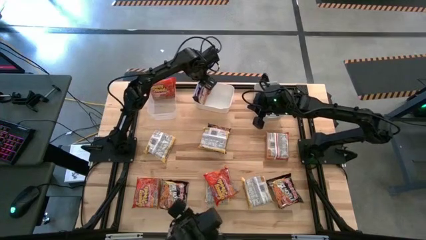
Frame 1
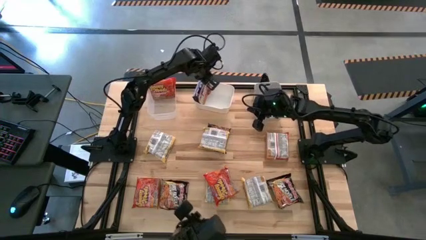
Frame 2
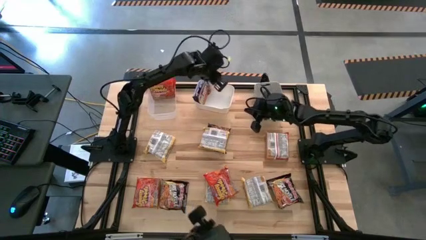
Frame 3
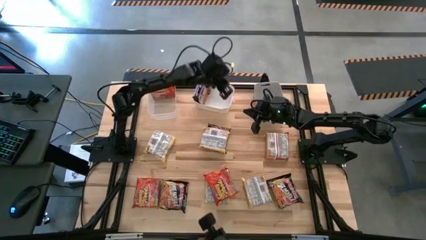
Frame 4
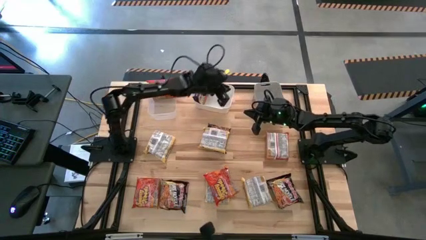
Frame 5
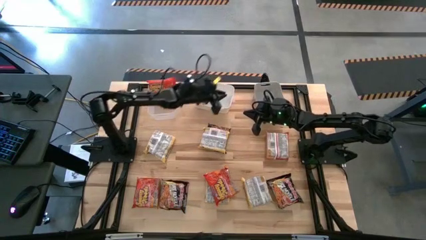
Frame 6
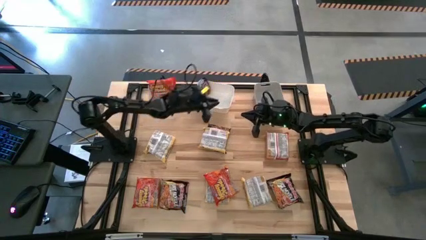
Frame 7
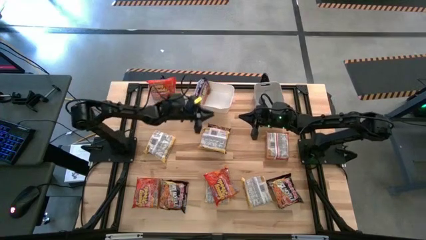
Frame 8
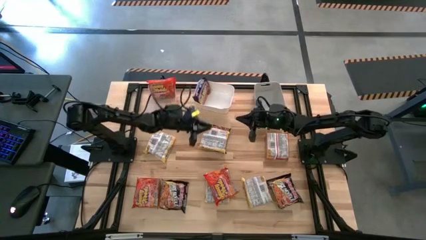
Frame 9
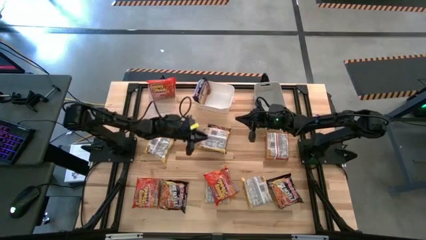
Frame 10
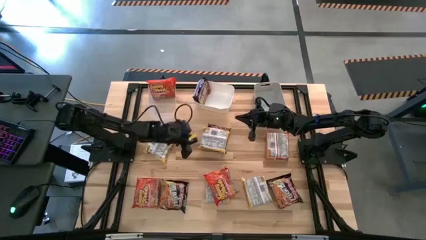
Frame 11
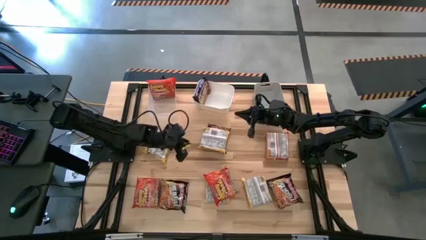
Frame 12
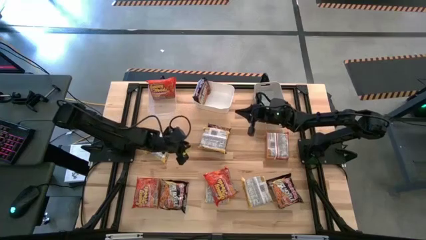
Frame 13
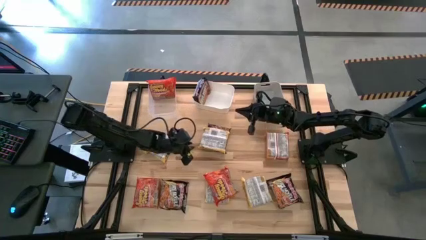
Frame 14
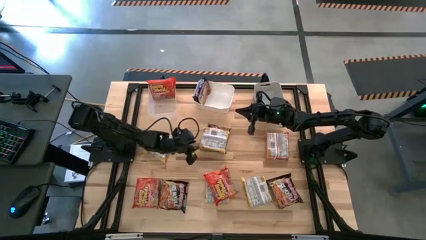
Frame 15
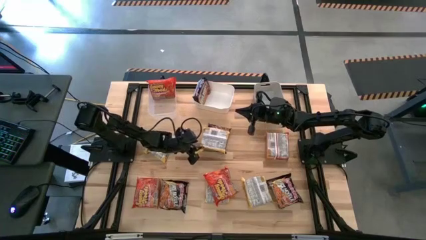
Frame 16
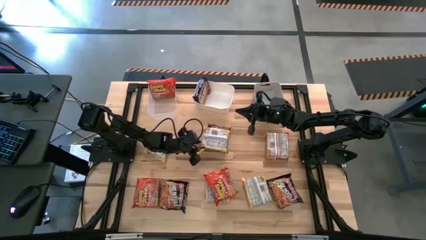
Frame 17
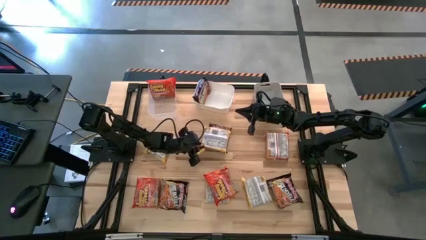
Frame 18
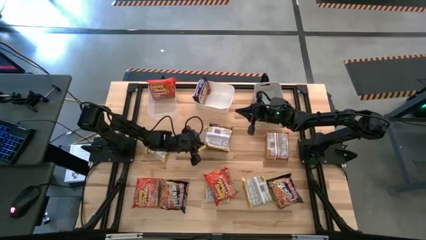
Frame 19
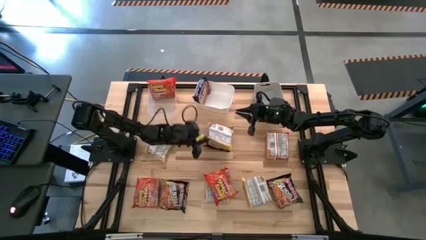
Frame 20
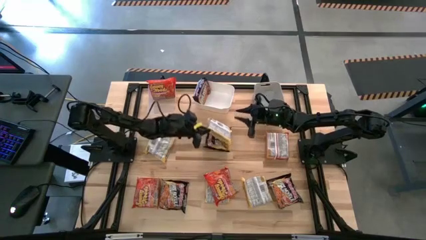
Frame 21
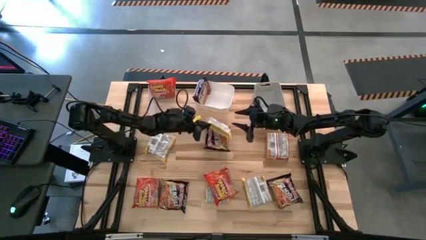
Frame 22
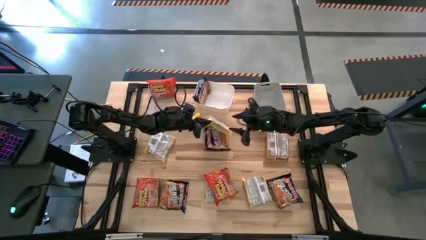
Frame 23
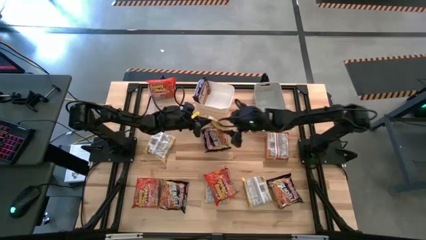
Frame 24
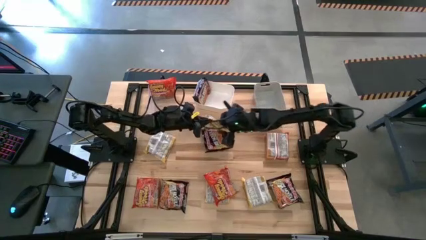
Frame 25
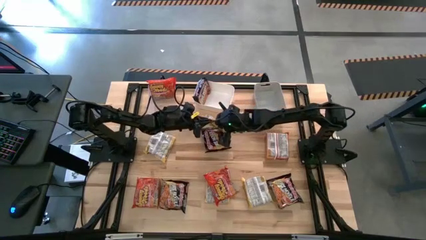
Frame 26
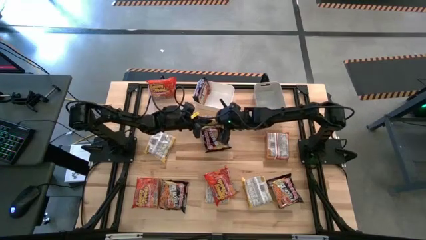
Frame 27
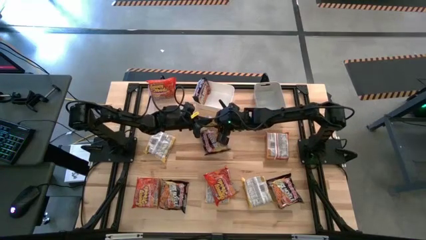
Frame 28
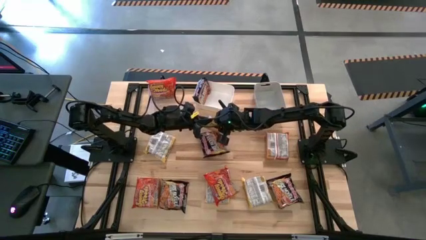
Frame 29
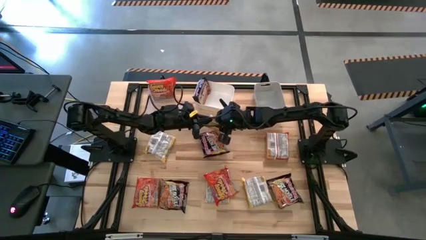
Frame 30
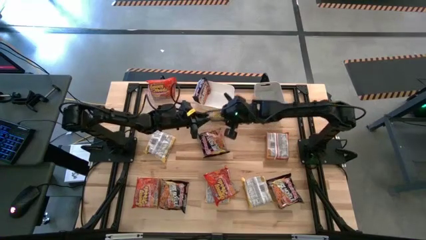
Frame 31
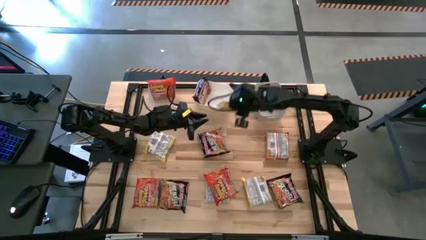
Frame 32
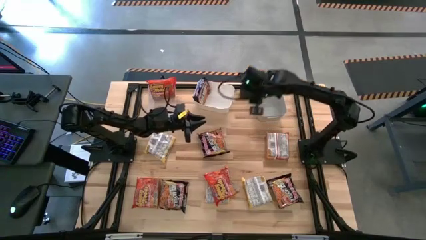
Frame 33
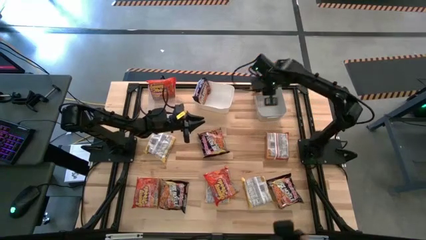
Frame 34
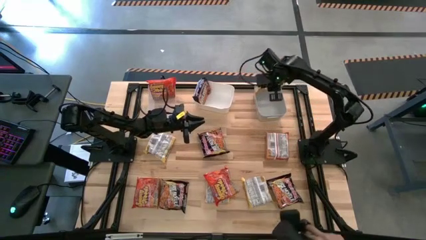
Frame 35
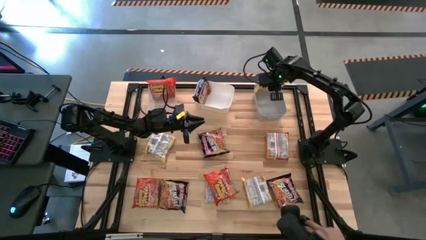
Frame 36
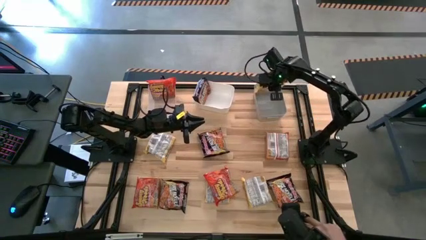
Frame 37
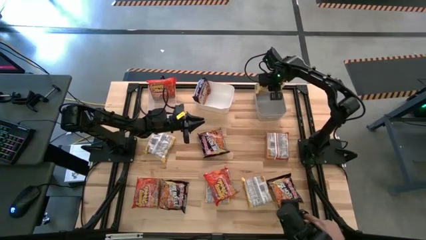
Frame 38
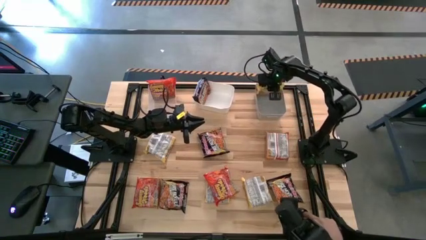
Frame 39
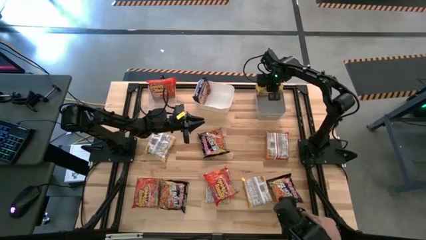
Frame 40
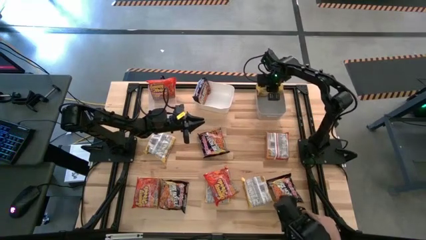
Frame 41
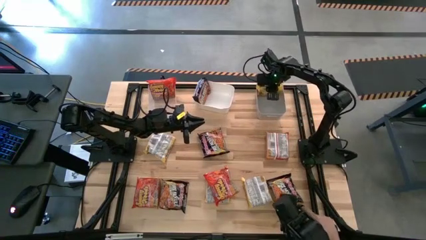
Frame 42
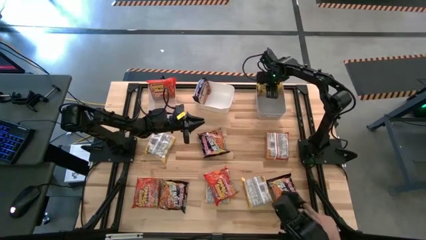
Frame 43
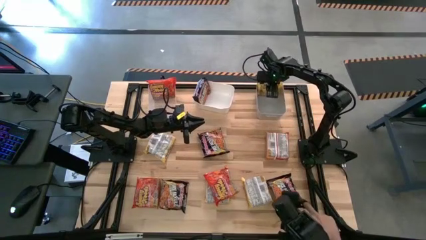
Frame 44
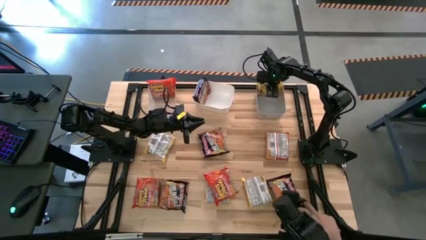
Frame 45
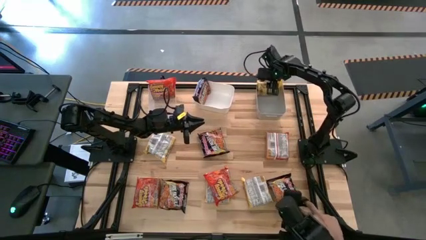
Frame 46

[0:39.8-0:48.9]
Task: Sort Maruchan noodles
Put the yellow noodle pack into the gray bin

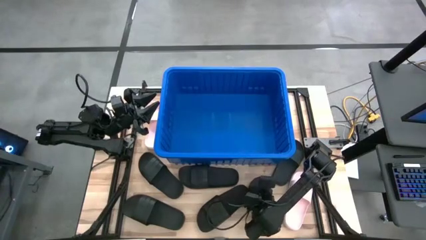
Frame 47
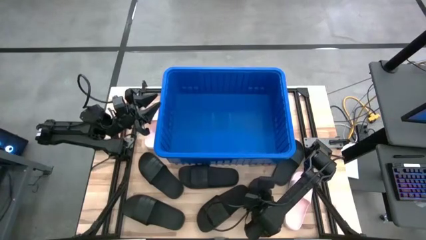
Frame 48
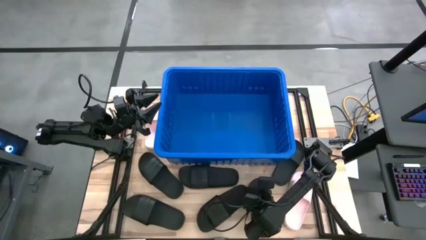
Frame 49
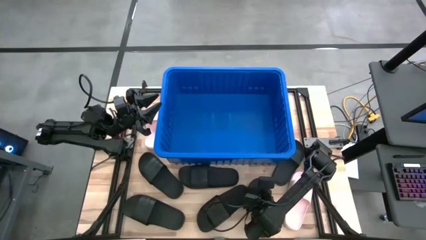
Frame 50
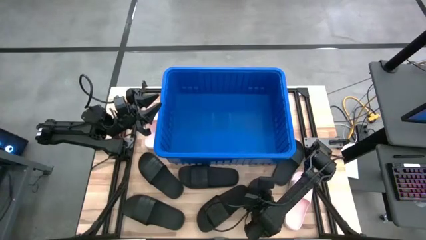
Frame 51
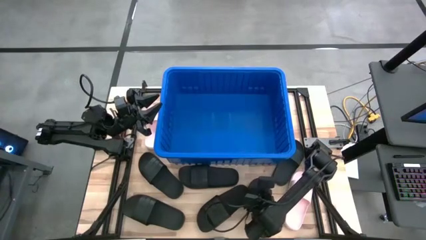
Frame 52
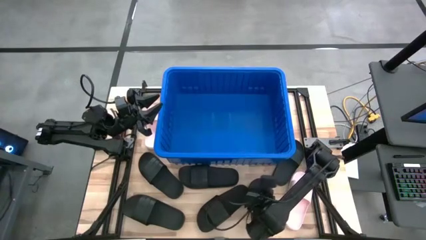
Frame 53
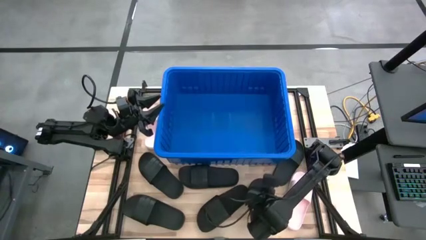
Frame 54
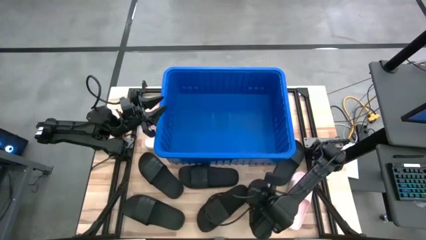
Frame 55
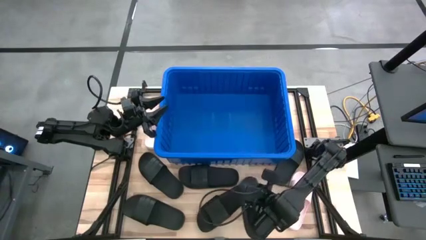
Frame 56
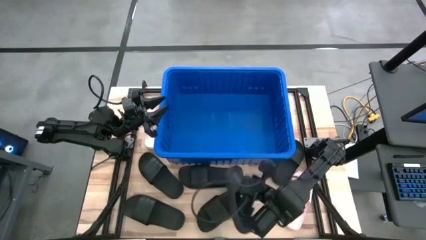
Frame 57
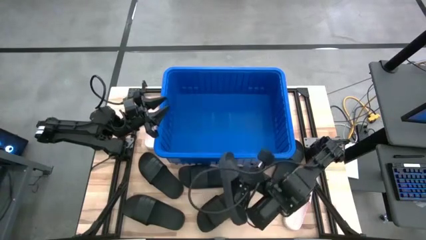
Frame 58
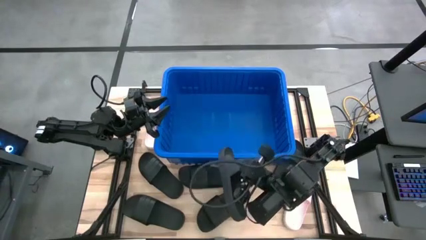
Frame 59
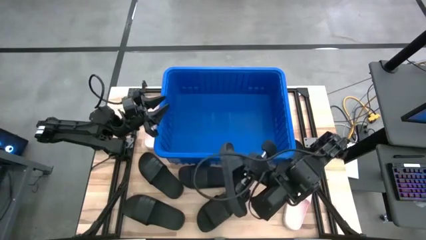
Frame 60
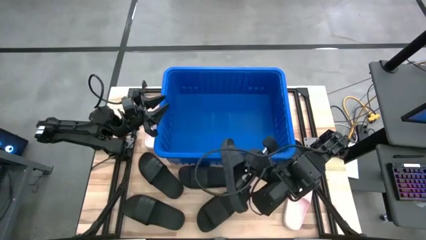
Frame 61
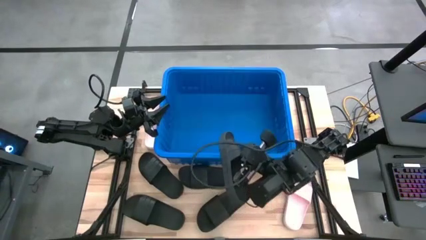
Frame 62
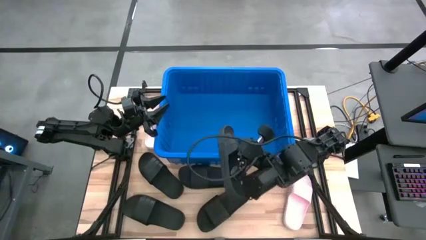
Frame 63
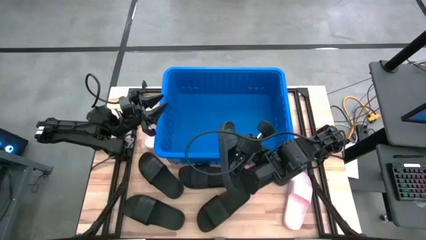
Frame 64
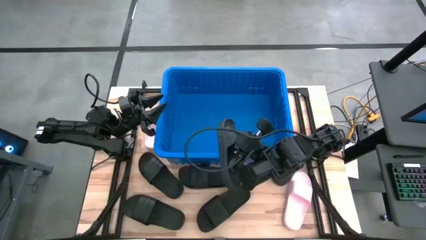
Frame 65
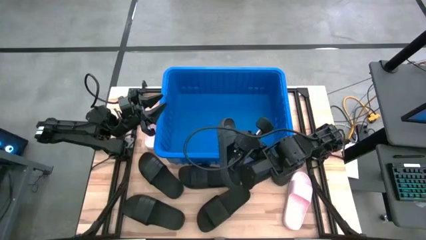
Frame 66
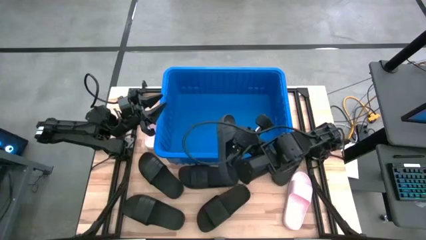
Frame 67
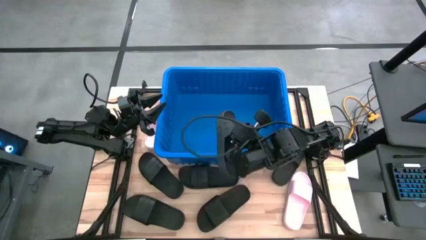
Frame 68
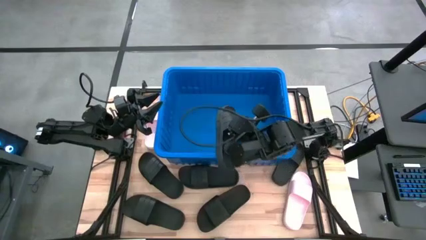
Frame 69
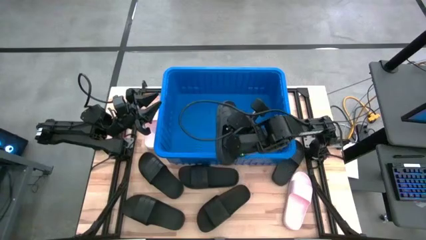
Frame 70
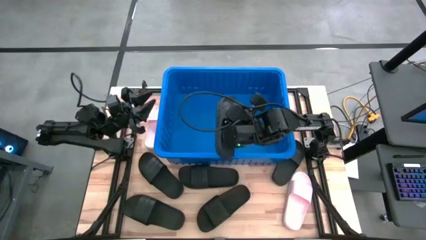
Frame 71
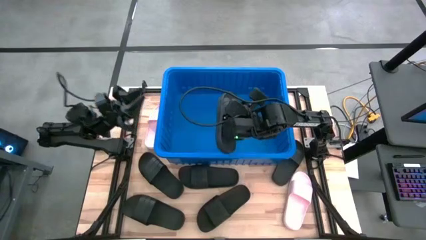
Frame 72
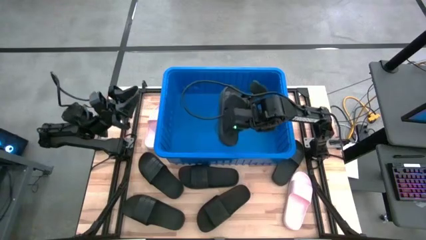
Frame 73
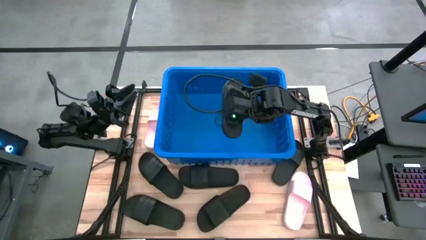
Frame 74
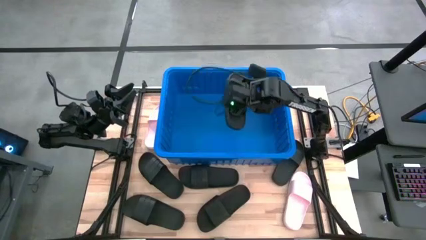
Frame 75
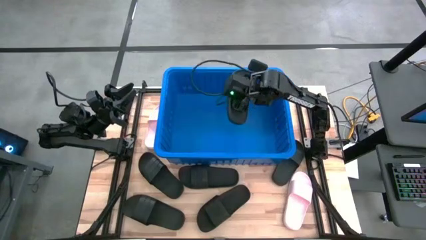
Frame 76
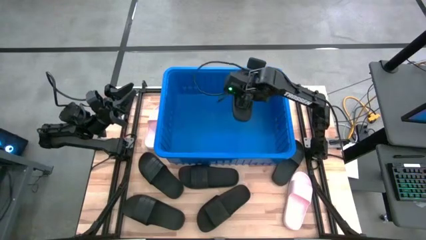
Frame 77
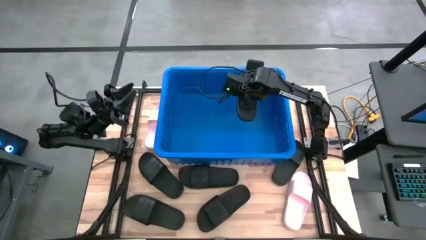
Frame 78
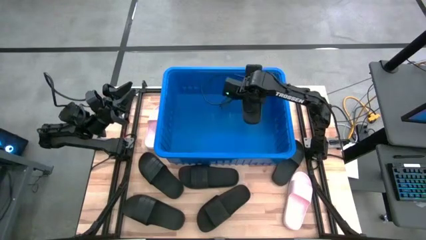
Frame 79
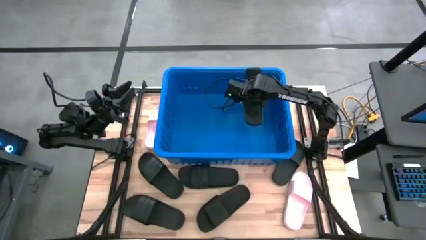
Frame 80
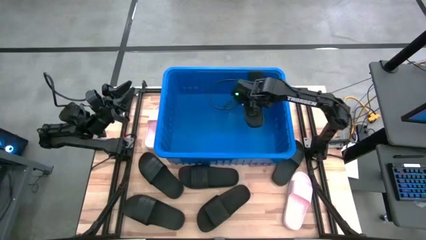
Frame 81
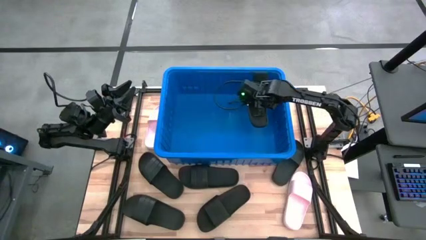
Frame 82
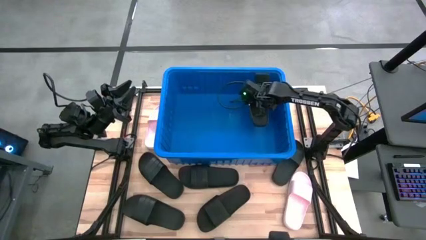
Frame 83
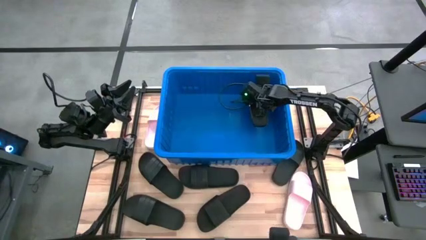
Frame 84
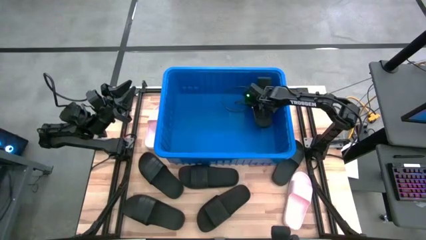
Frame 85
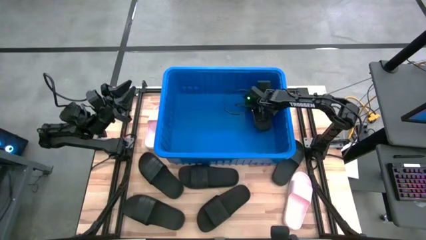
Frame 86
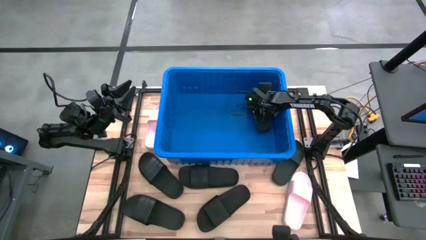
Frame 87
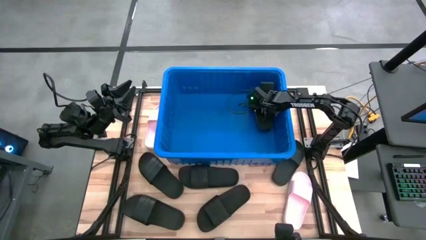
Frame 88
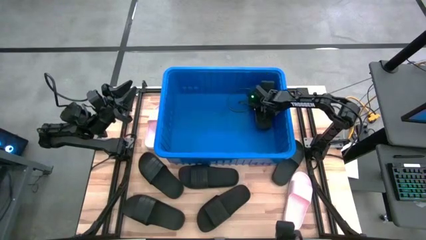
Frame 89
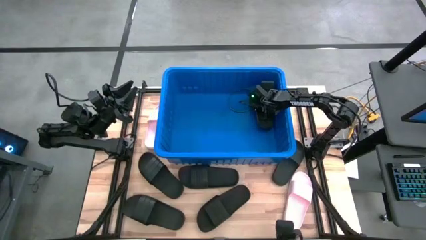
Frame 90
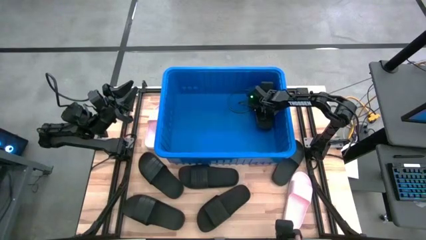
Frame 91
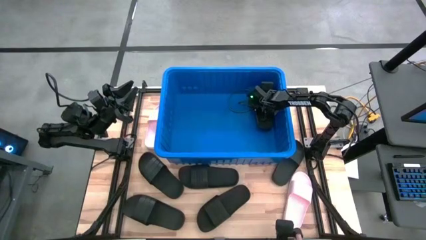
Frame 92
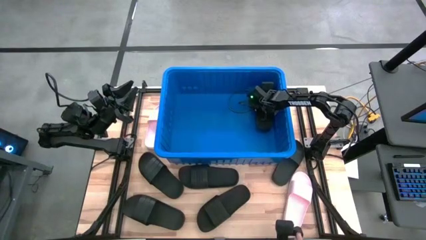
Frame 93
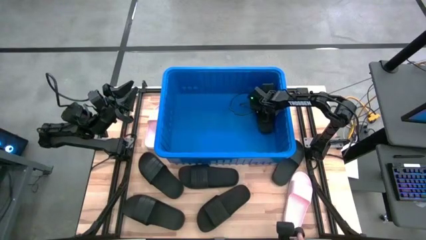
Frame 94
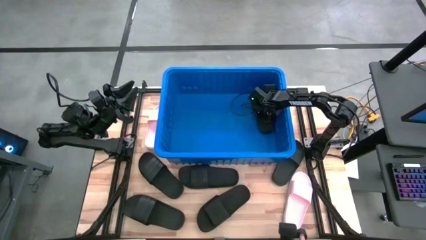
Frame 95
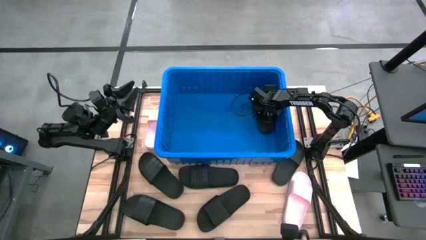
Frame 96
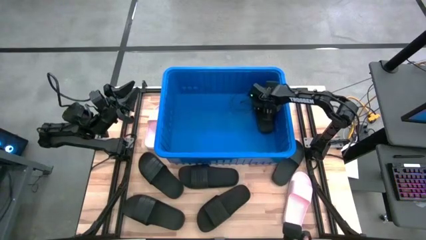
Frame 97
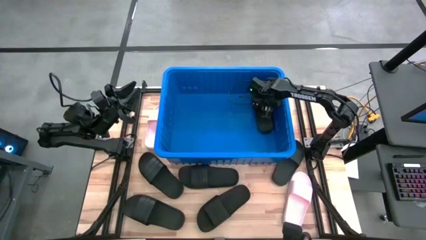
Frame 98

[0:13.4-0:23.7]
Task: Pick and place slides into bin
Put the black slide into the blue bin
